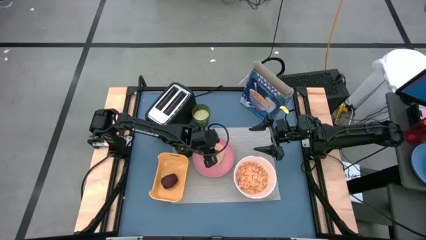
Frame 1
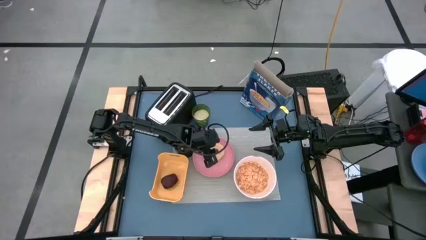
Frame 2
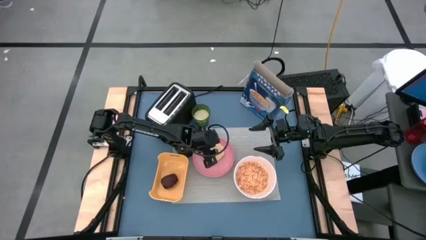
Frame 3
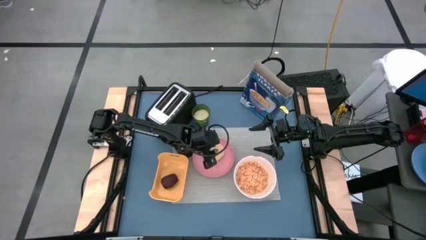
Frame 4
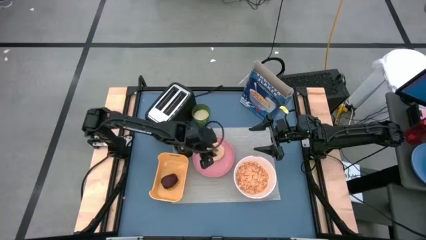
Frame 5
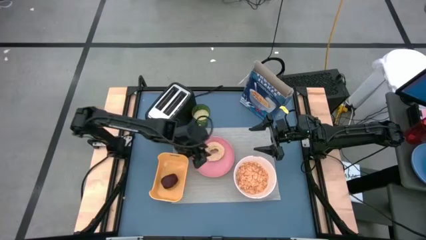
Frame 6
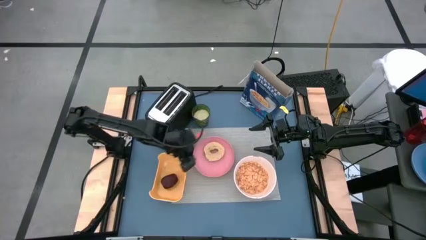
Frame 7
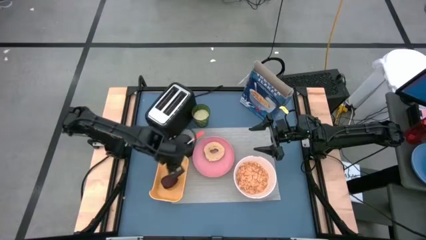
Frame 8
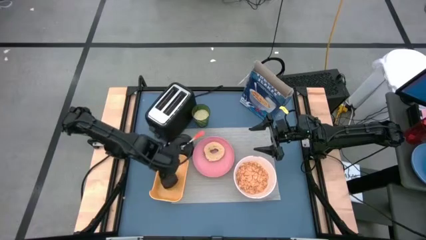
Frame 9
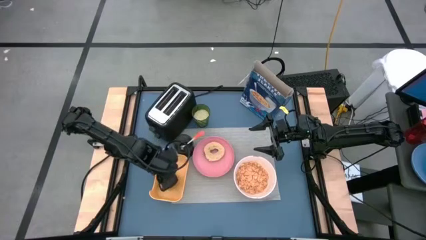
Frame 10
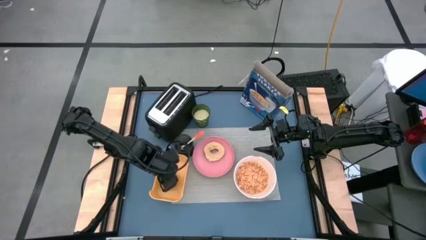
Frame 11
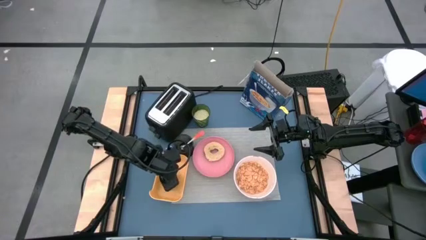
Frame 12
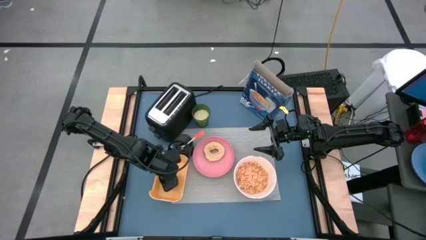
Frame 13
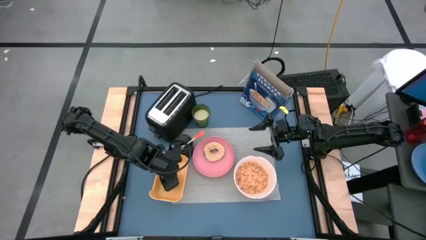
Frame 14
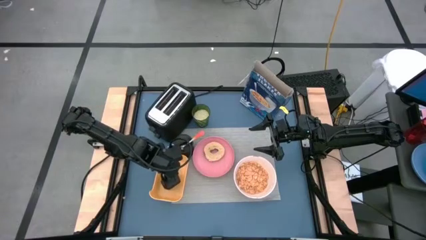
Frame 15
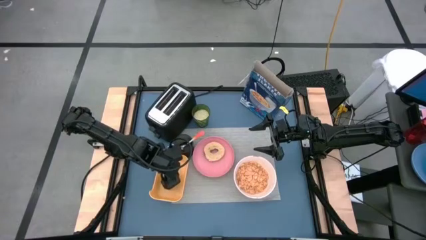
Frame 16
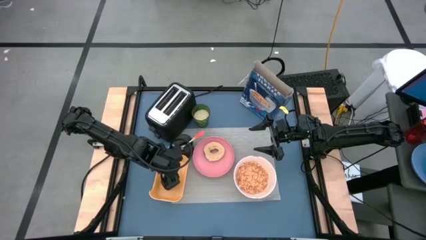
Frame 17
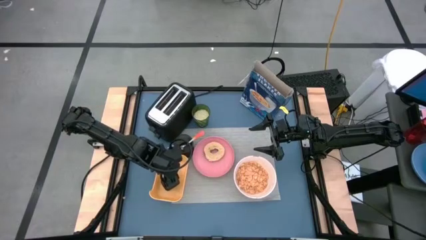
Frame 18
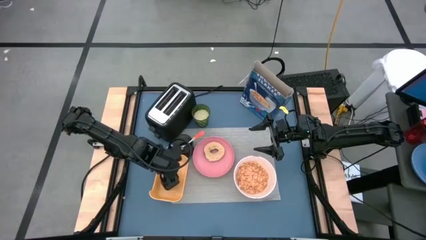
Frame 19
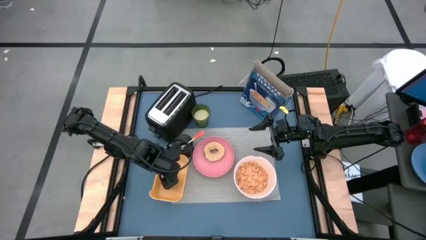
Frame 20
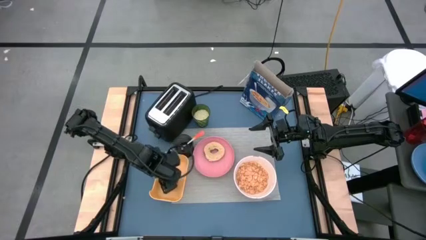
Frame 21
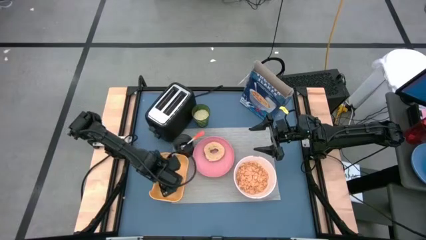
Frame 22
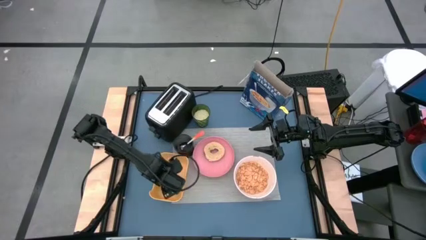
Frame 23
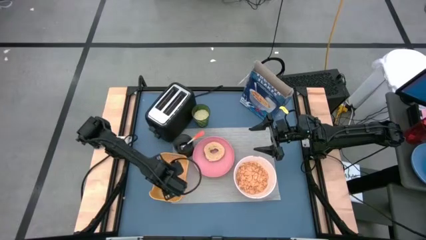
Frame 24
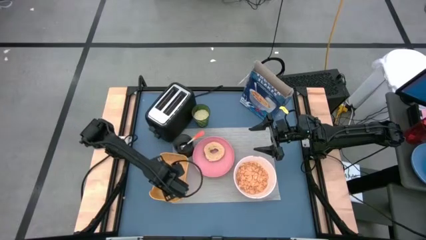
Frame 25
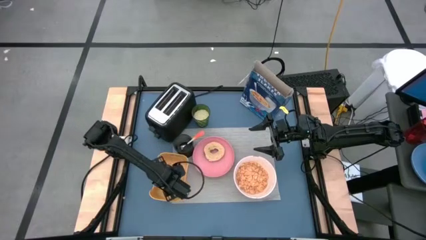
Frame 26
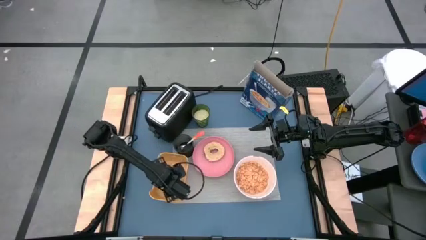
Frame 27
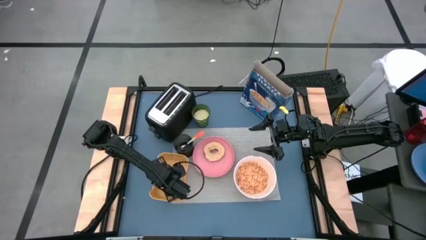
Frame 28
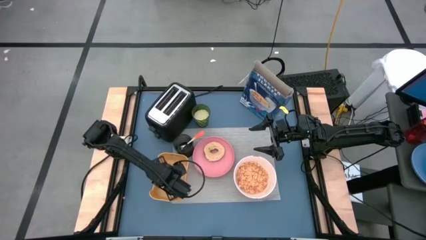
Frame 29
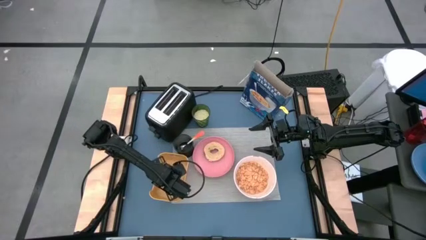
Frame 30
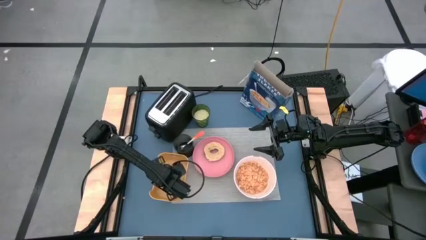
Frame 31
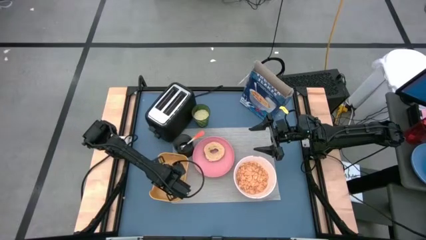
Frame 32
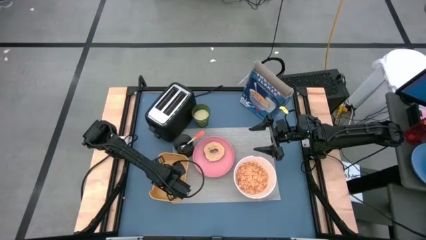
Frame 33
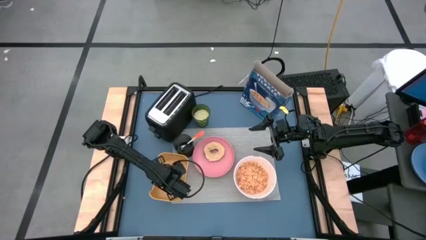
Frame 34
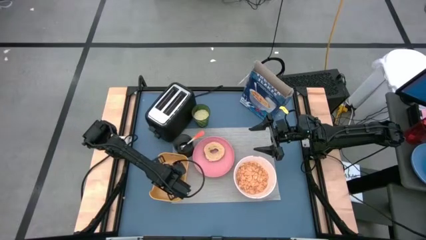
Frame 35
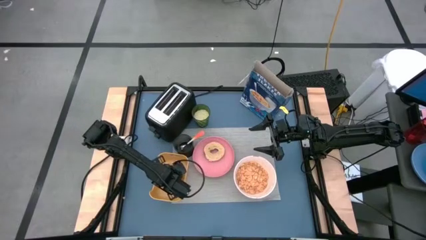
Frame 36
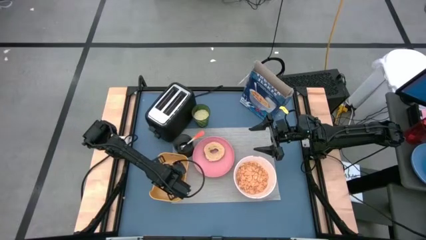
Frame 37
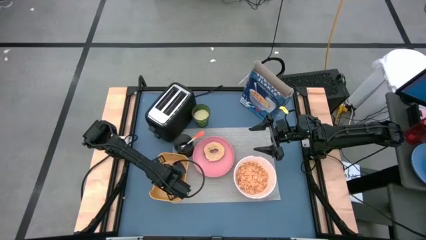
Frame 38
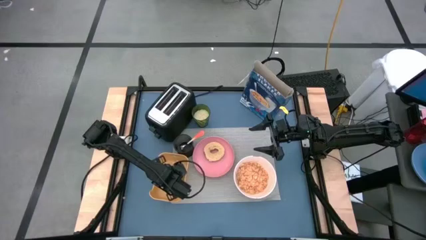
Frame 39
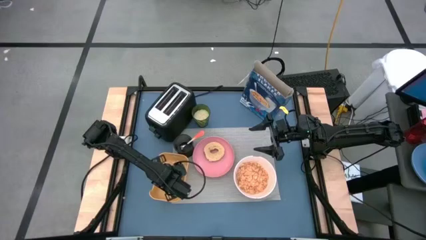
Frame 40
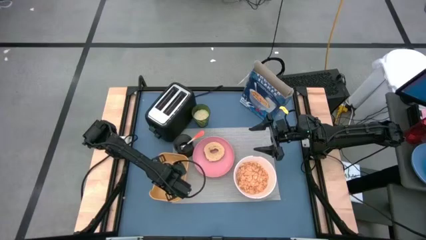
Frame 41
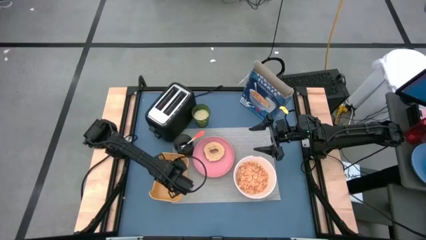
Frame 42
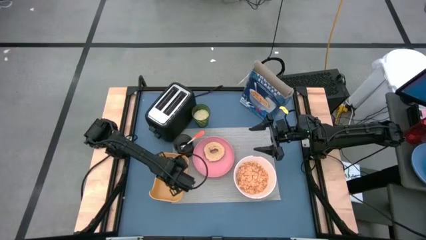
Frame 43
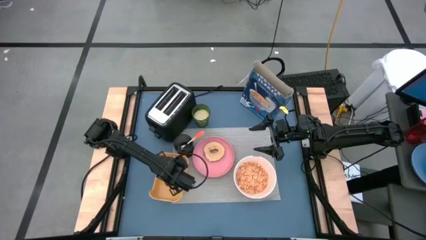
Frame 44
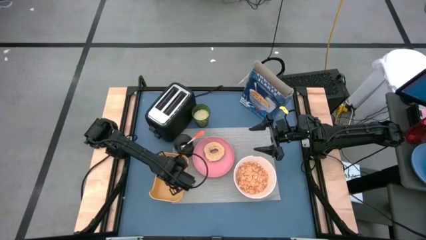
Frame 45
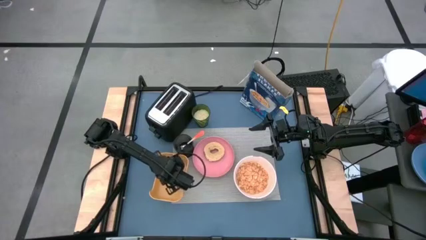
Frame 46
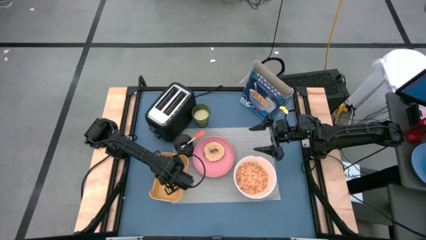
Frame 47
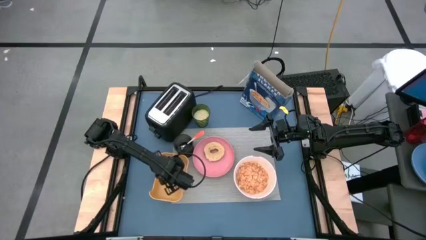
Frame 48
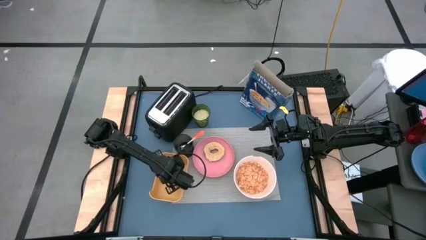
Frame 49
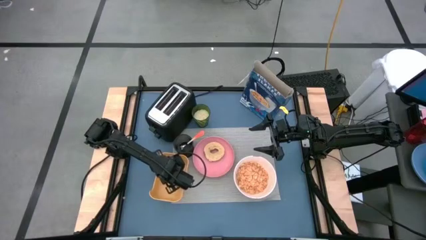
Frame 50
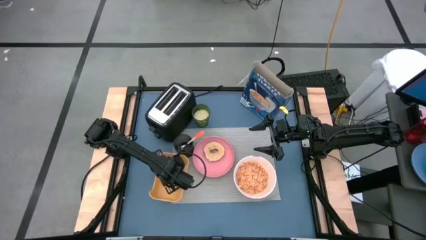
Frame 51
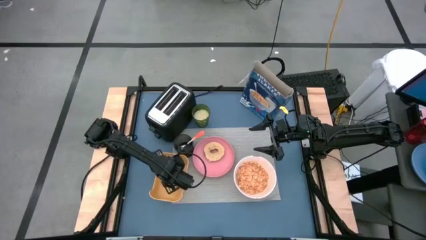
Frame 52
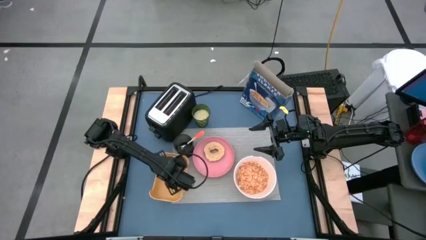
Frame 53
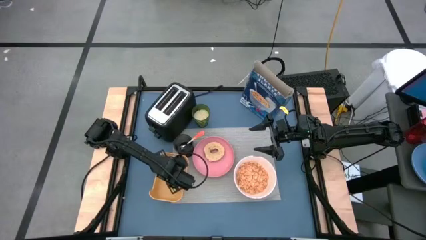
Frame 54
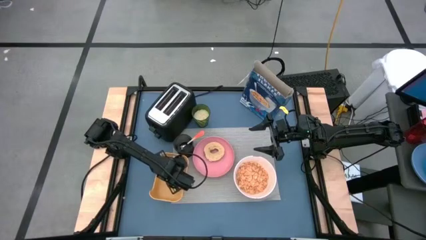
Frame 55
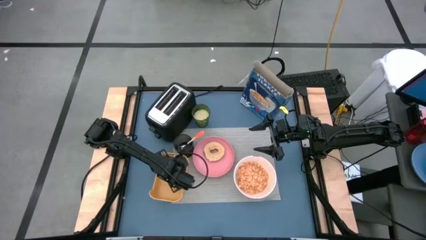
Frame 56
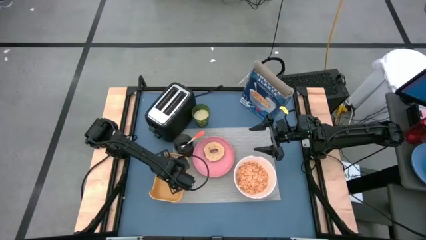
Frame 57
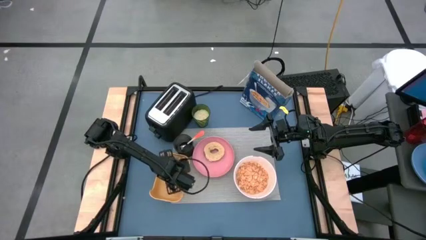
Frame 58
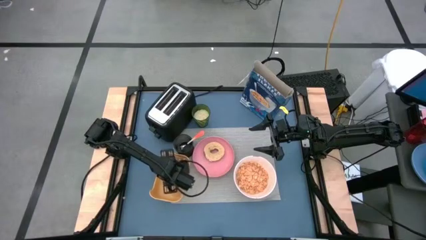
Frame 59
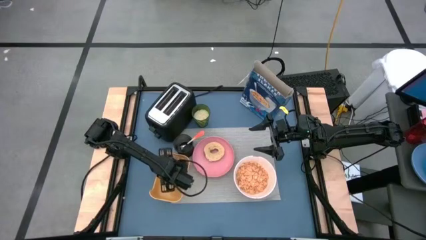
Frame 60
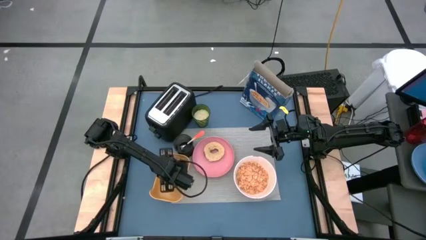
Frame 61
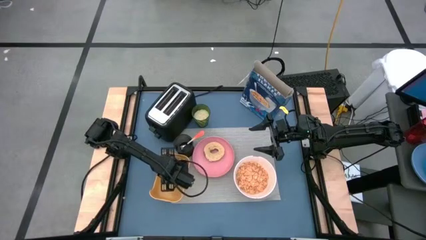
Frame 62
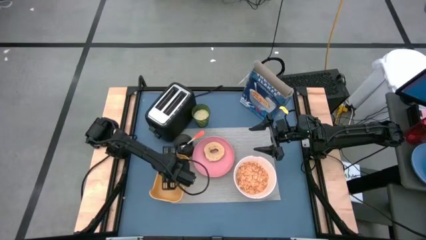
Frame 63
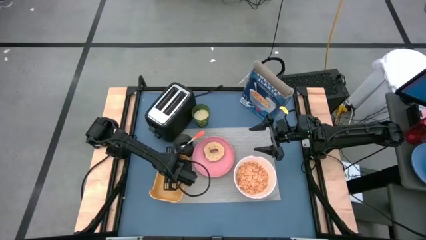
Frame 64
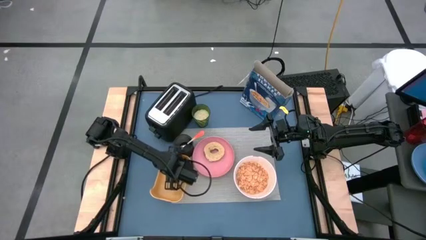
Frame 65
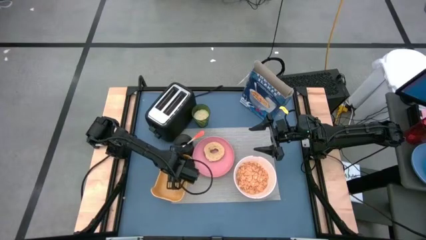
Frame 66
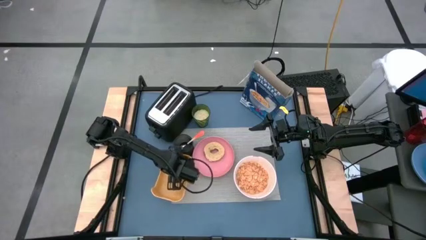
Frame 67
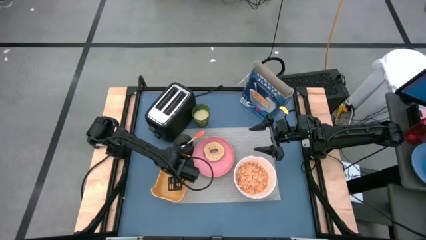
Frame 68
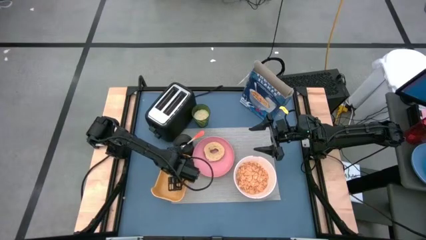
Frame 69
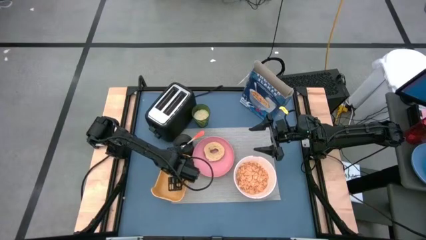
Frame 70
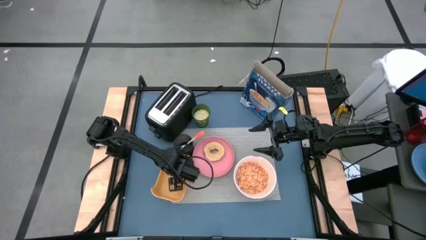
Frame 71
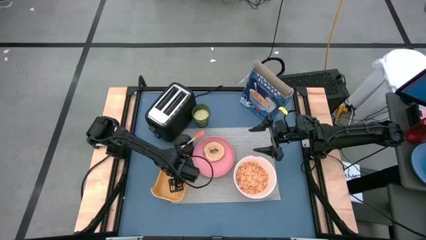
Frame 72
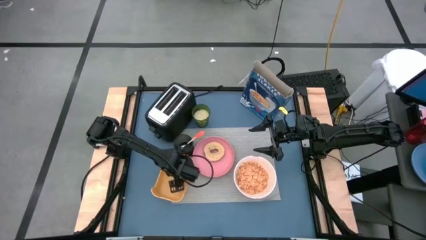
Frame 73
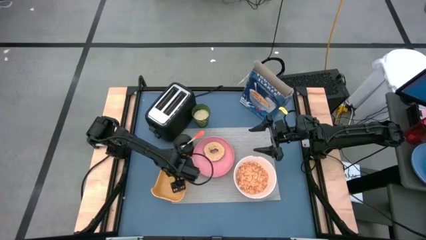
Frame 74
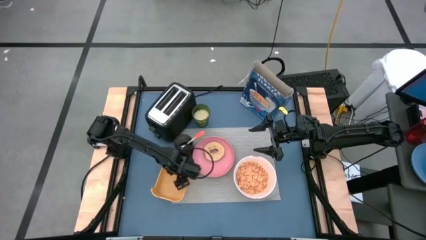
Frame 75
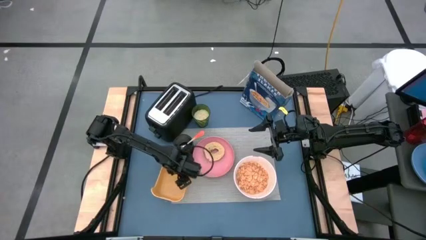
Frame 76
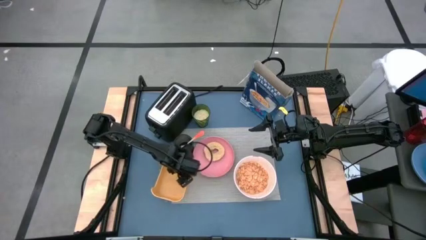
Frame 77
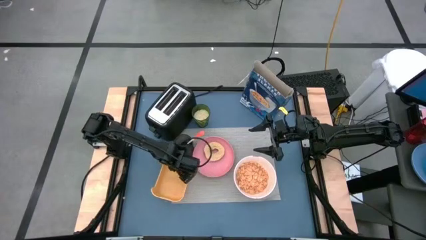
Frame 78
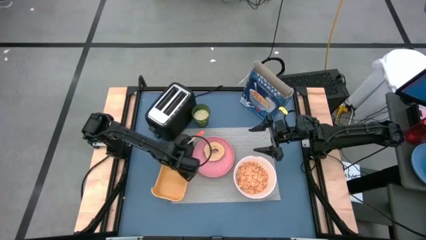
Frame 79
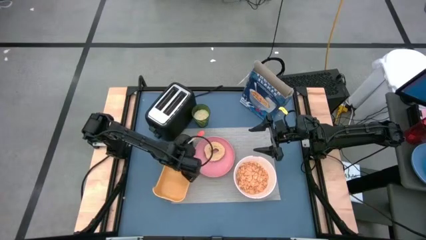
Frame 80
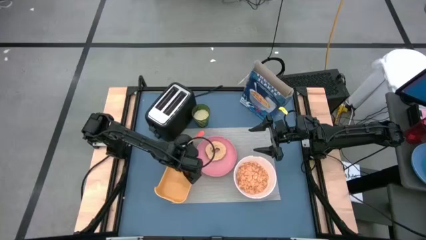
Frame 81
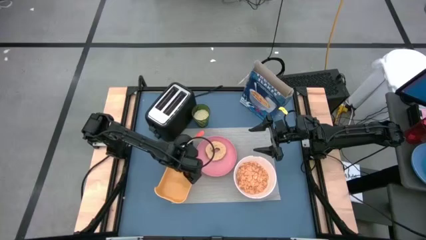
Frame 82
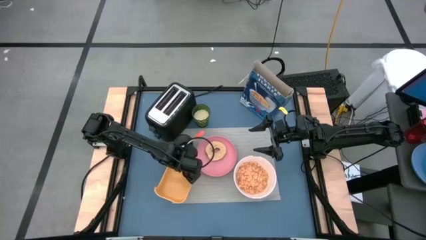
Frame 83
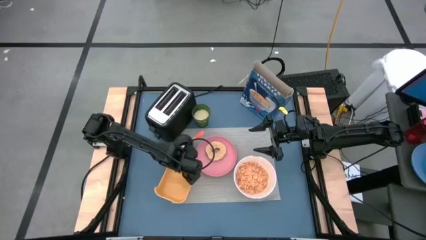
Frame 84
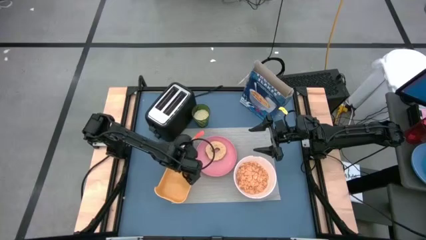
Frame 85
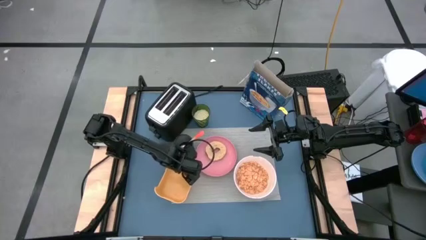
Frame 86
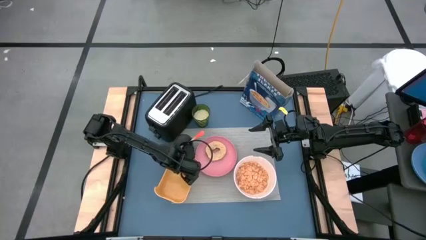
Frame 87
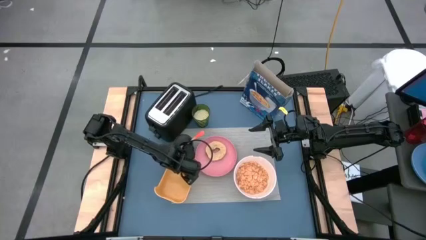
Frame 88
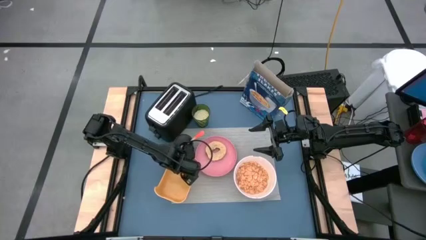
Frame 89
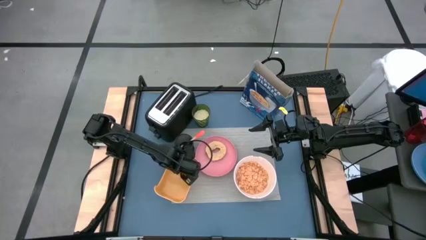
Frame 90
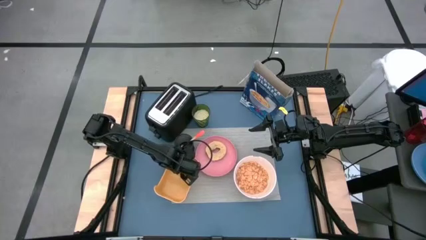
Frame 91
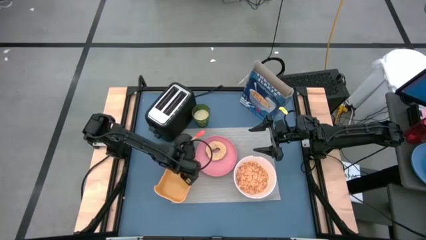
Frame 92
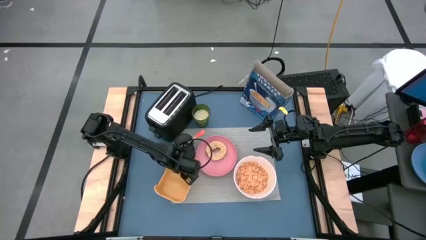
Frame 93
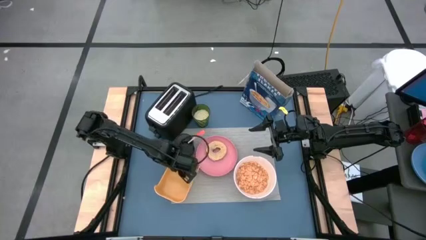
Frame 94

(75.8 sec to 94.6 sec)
Task: Arrange a breakfast setting
Put the red apple on the gray placemat
